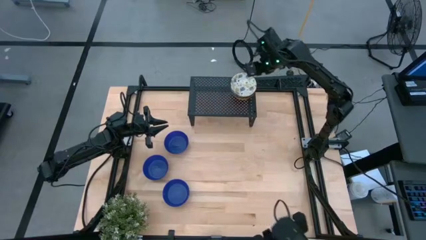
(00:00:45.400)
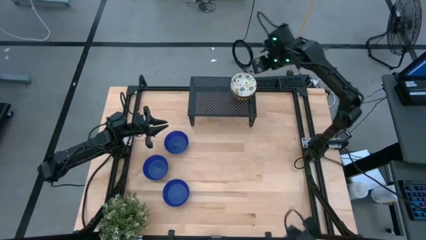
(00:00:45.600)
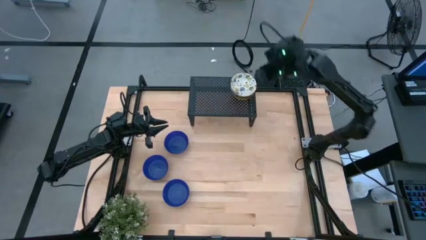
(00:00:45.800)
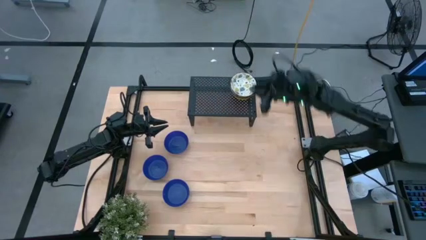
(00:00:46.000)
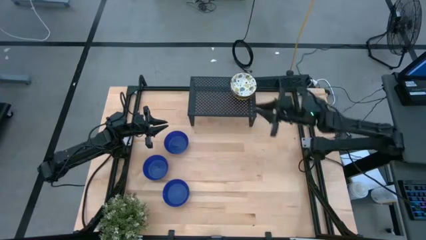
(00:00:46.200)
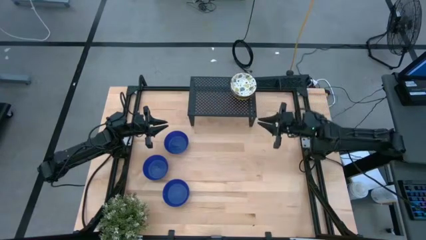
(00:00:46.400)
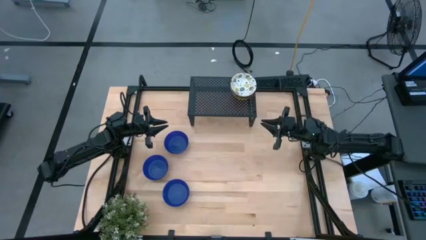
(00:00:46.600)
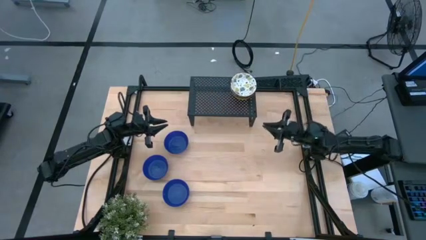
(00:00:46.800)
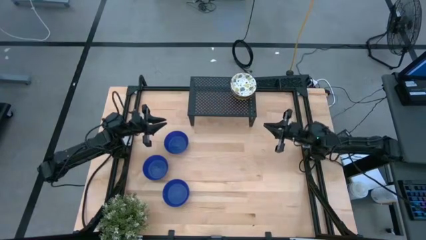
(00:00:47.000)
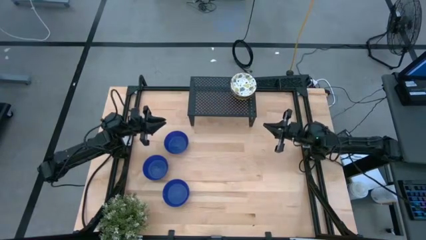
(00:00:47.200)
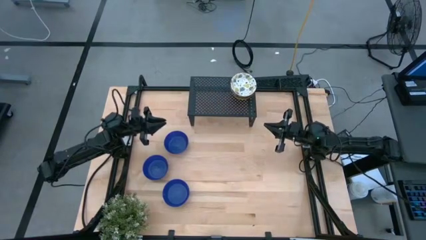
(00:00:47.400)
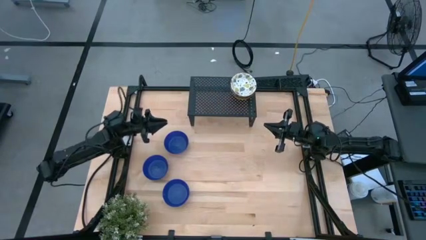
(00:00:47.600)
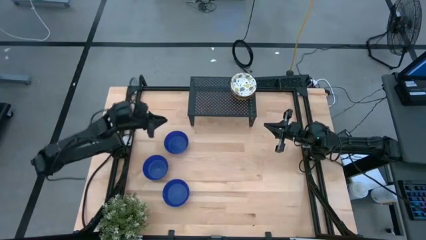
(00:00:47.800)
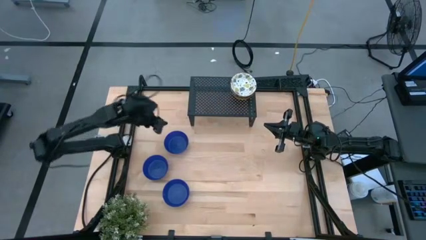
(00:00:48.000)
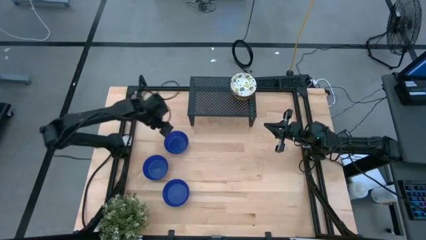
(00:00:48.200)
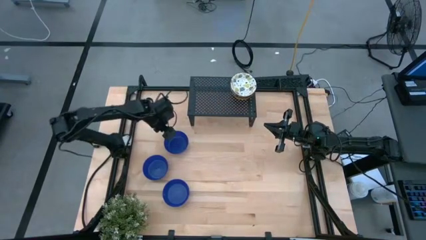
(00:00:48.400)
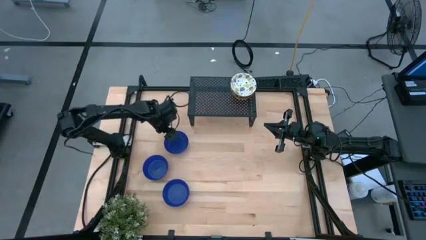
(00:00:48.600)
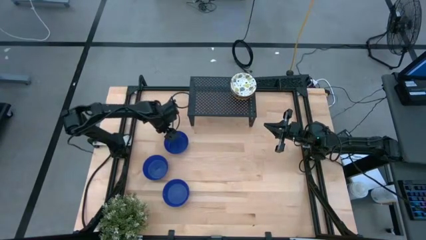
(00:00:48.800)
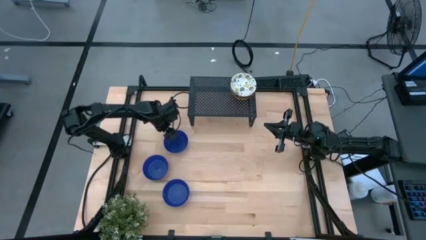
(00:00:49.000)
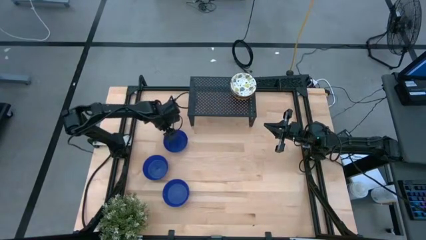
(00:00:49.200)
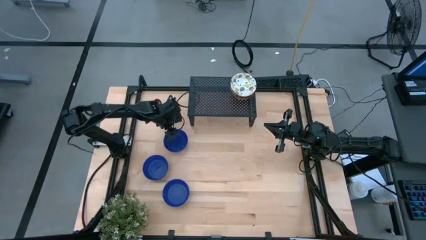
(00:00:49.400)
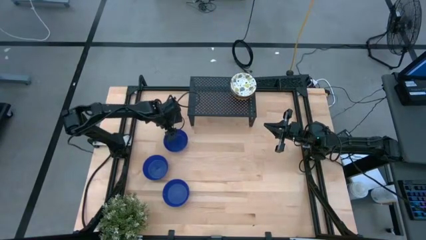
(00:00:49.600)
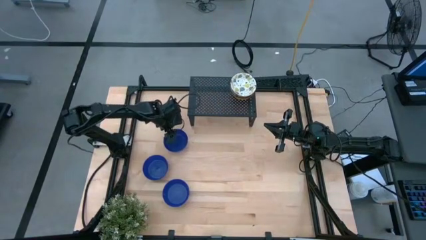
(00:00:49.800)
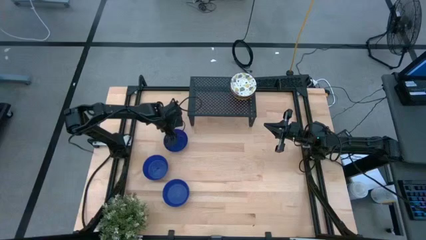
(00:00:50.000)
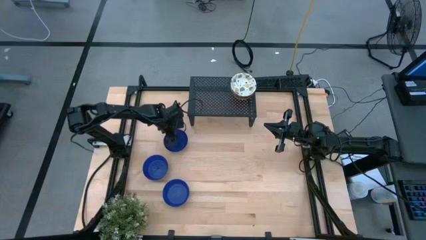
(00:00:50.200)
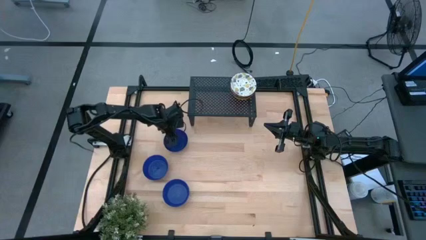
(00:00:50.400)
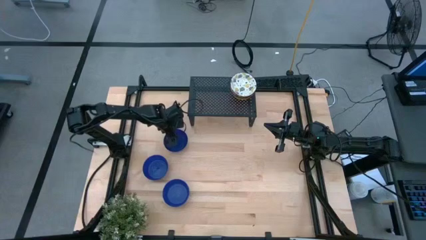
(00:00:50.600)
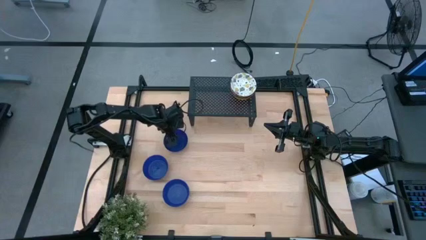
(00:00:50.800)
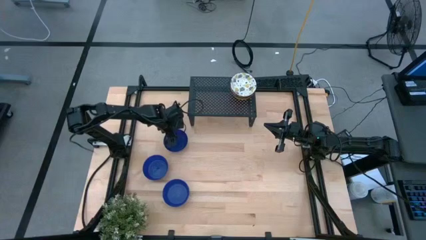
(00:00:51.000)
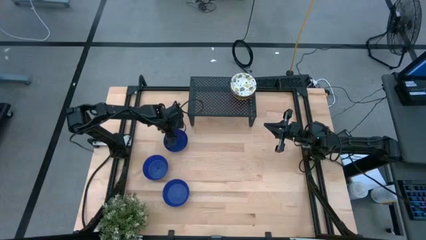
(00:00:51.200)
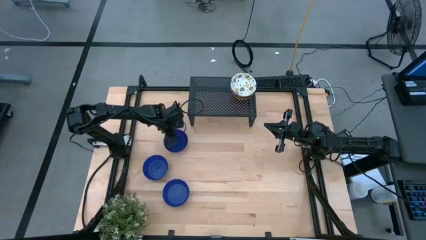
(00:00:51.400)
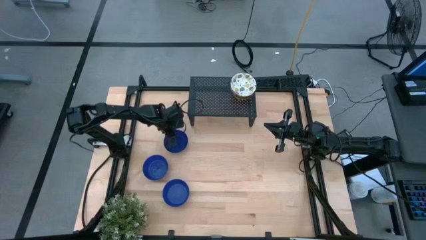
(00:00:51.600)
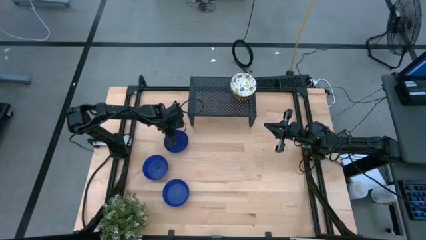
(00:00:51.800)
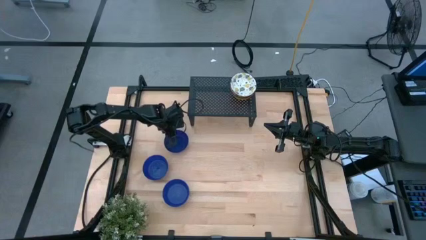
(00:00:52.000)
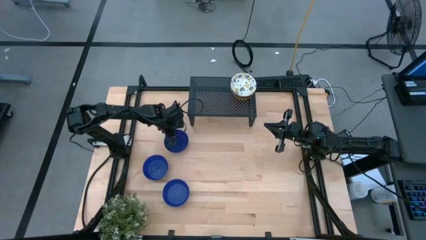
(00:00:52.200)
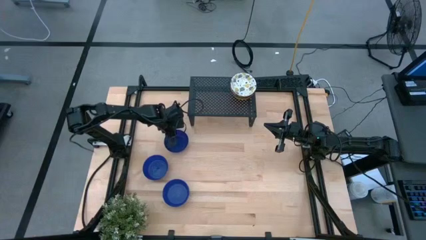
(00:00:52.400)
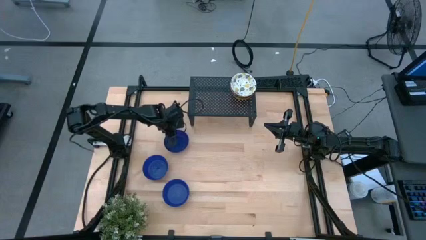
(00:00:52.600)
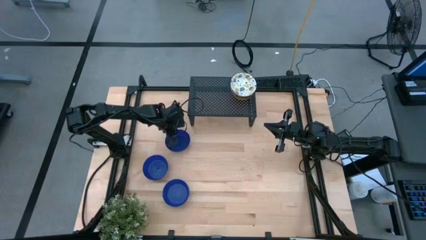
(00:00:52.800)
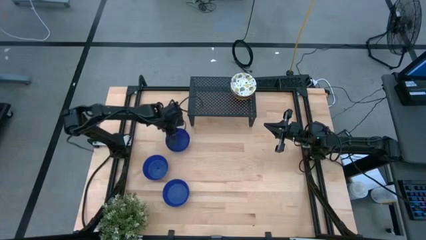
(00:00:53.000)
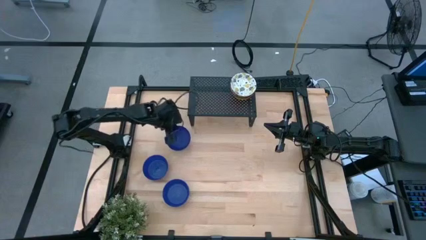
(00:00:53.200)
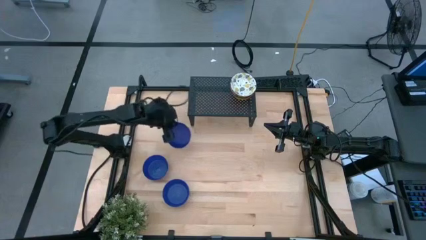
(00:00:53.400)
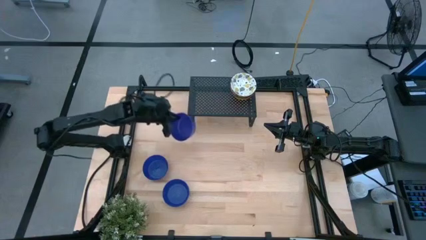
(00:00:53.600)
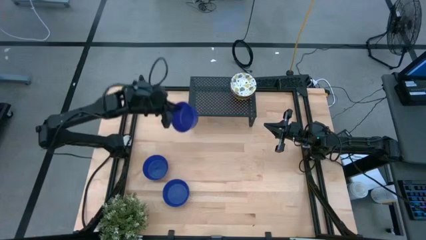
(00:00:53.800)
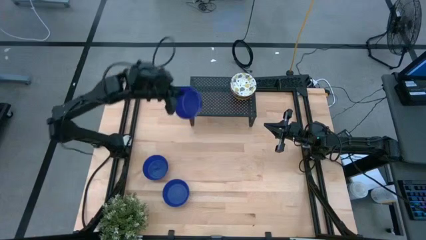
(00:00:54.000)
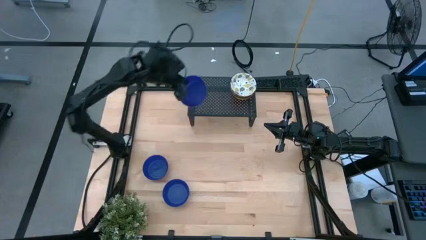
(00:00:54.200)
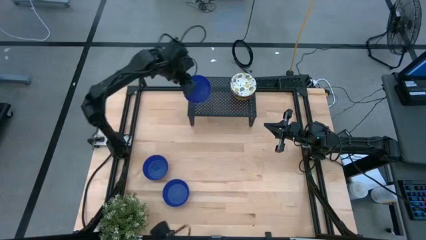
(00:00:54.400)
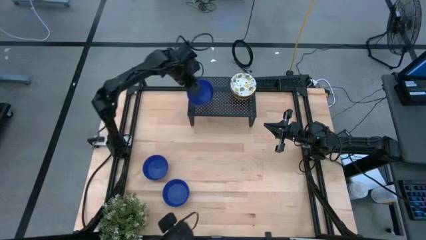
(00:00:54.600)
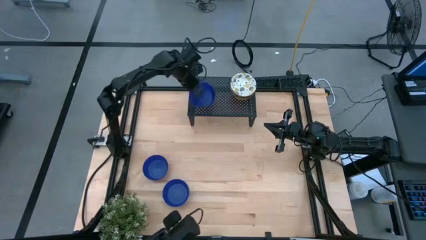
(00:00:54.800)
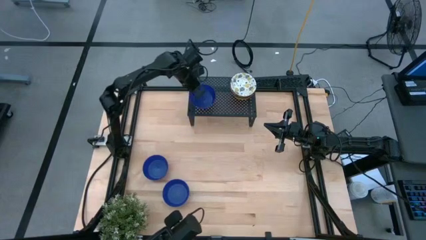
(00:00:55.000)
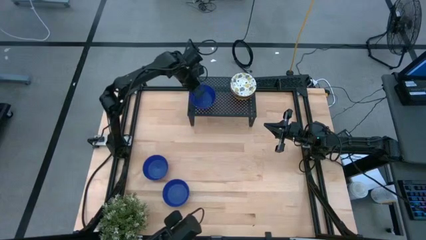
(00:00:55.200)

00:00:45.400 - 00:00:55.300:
Task: Pick & Place Mini bowls
Put the top blue bowl on the shelf
